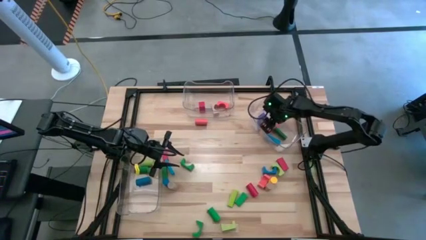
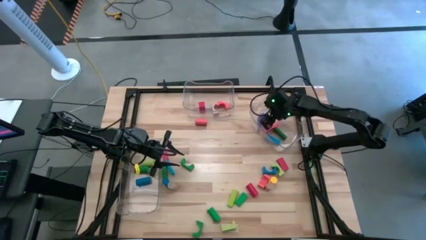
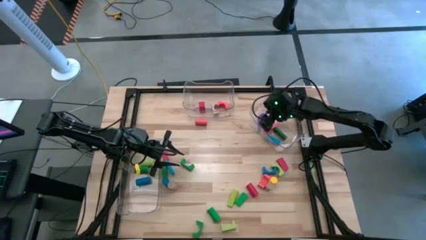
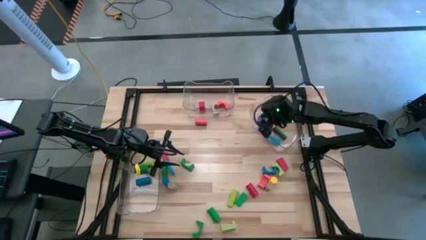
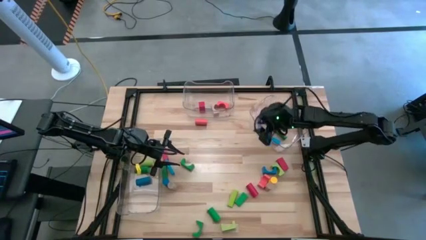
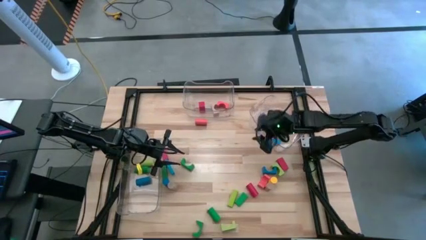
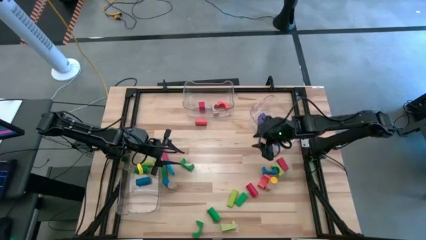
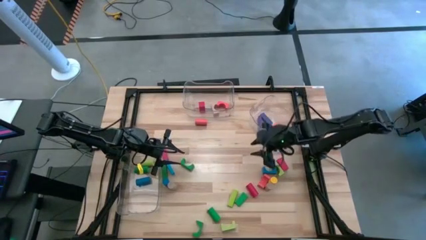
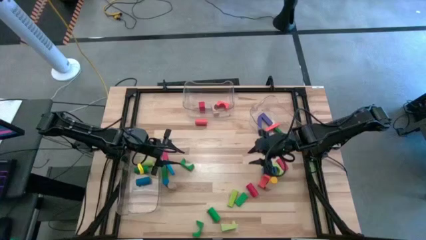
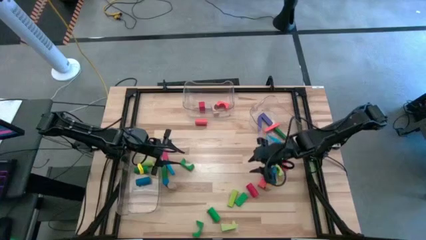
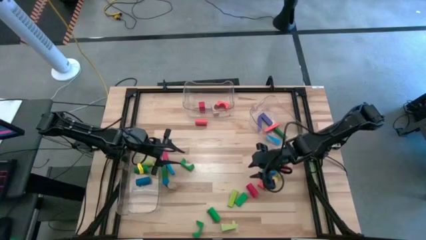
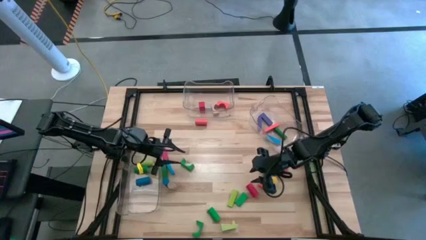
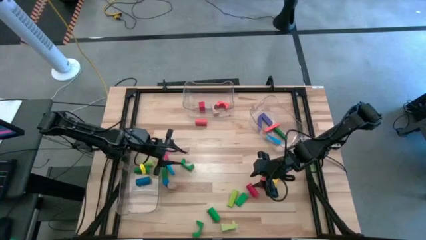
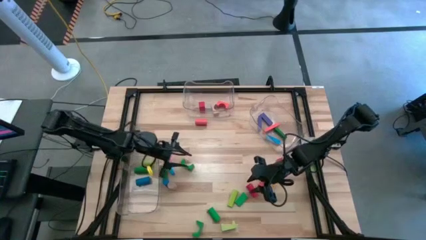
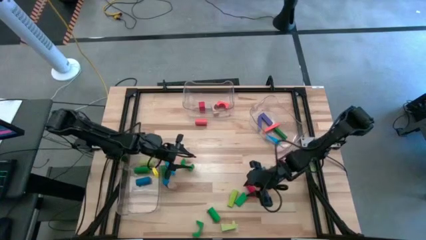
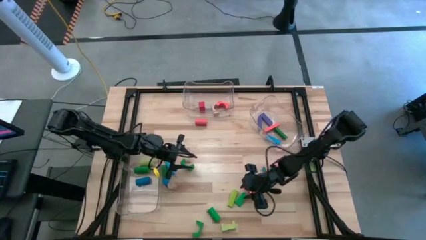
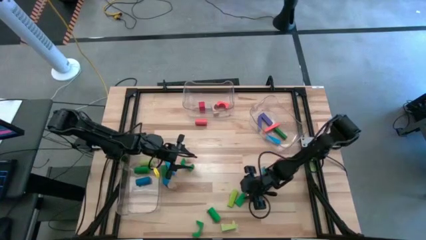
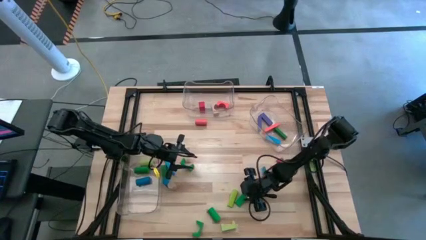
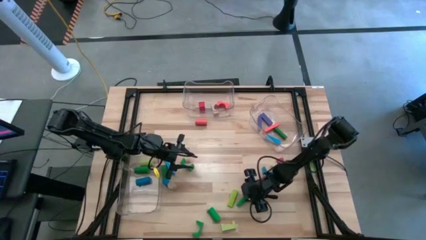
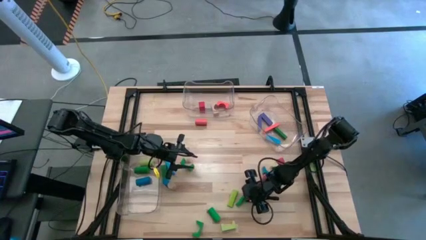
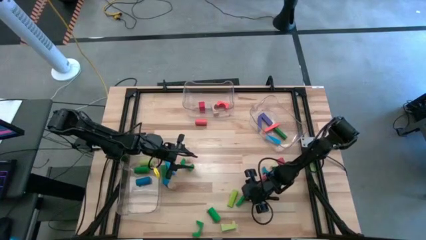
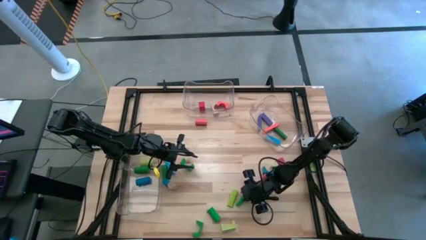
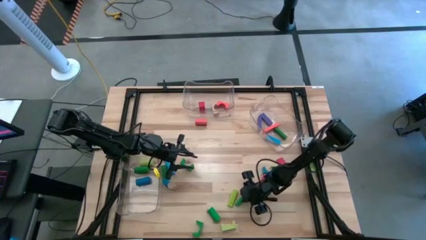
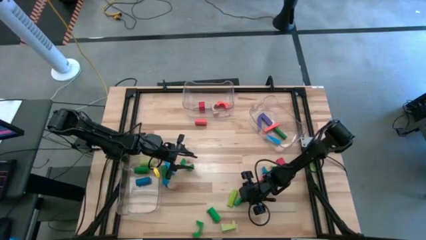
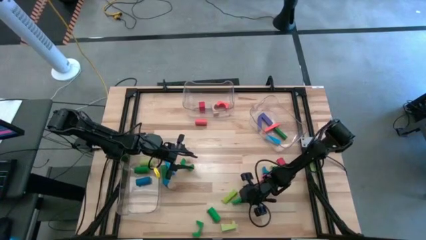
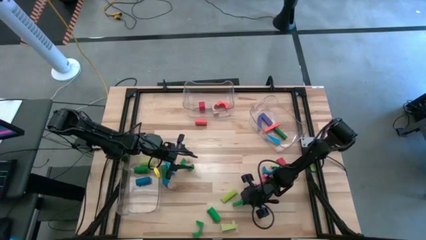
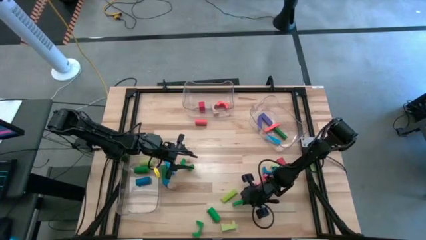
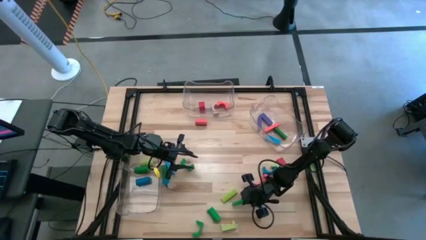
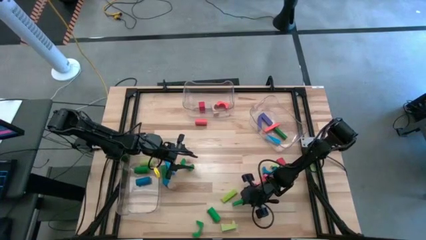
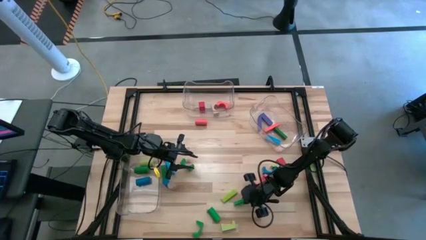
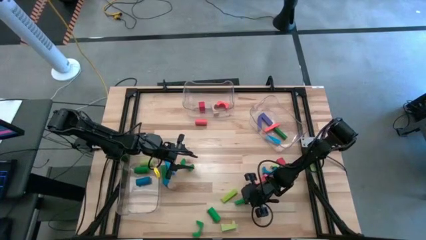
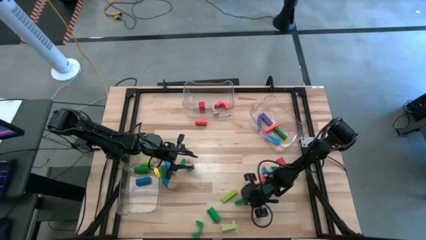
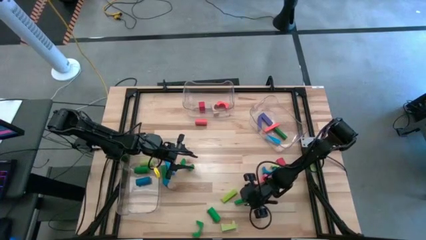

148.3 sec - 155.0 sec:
Task: Sort blocks by size
Put the green rectangular block into the right transparent bin

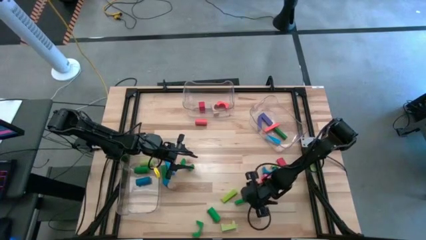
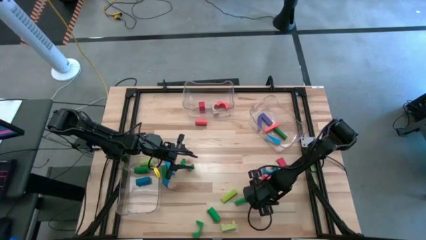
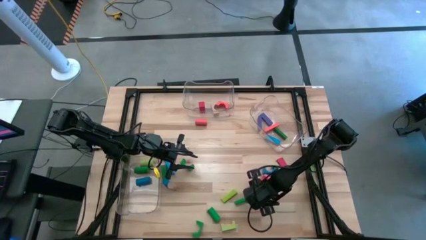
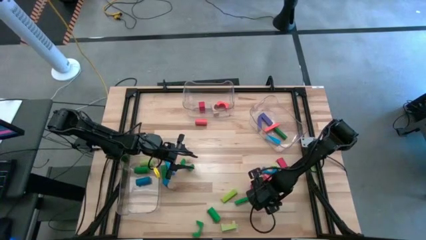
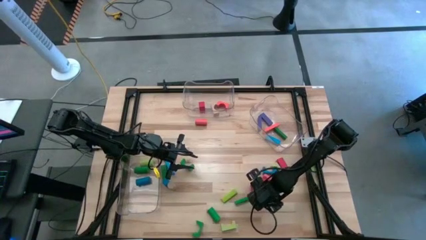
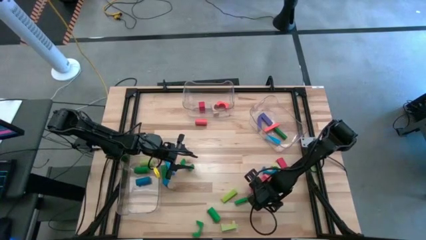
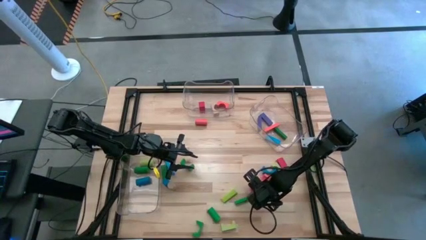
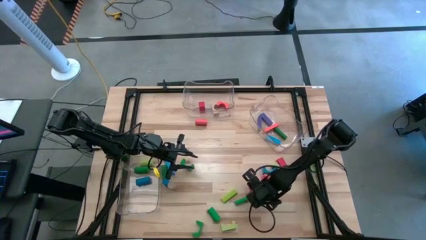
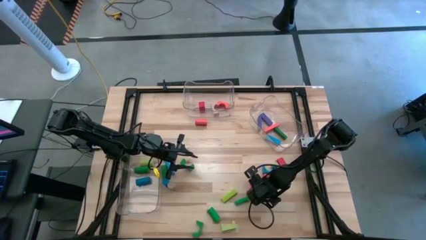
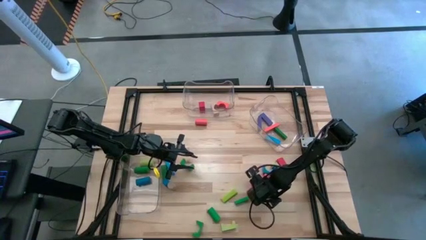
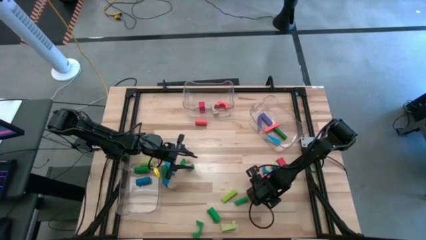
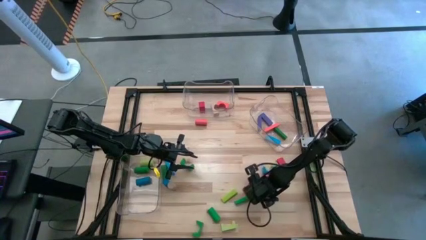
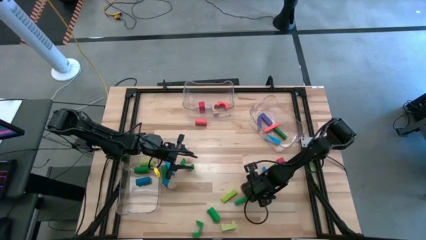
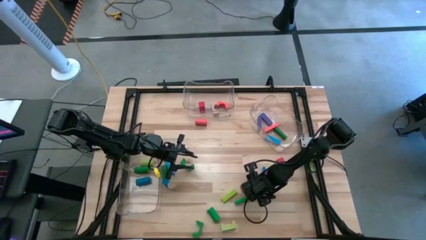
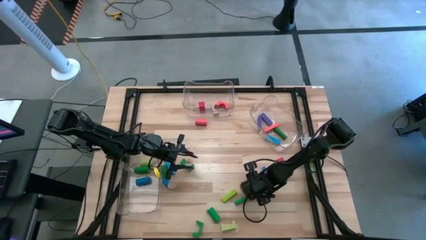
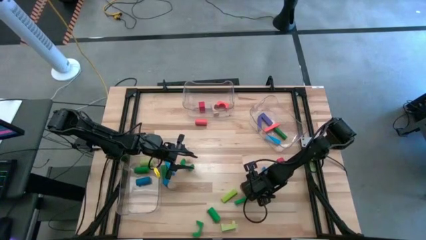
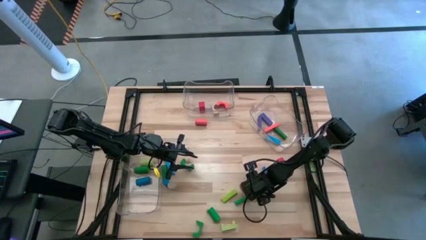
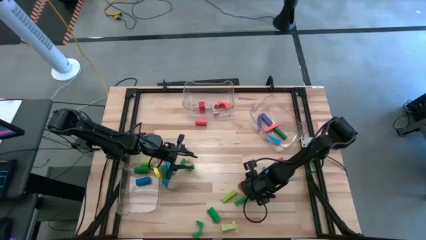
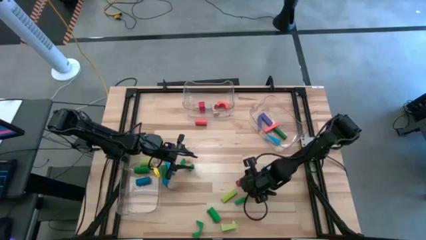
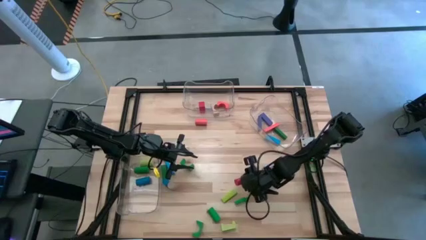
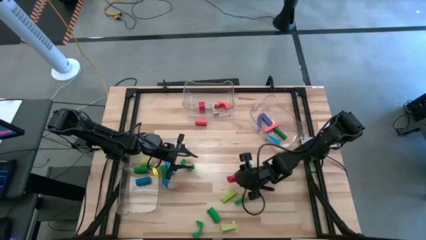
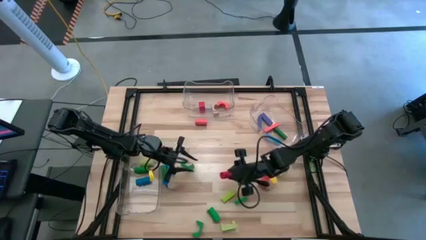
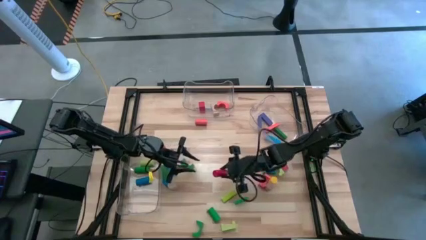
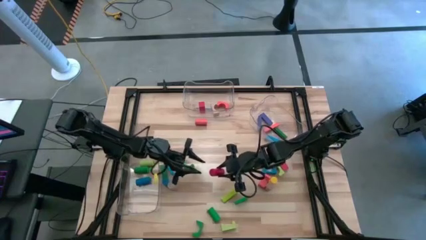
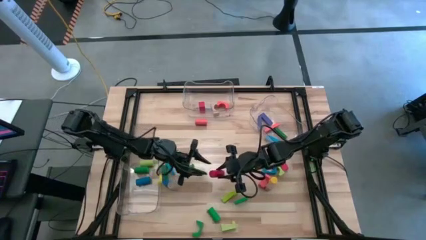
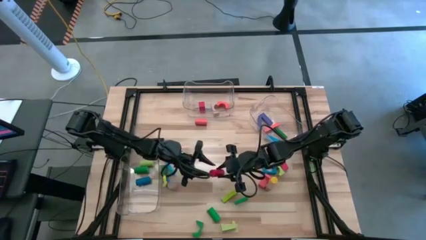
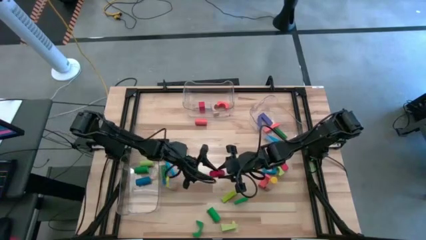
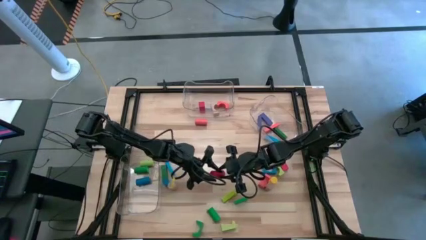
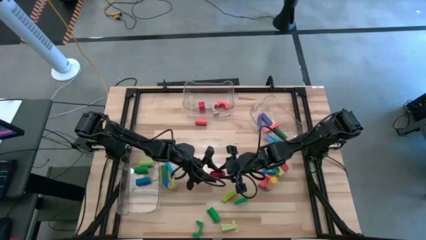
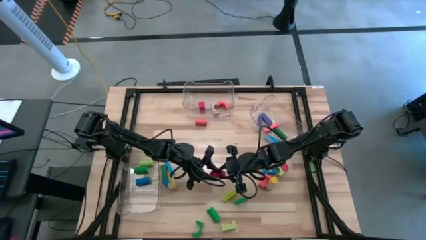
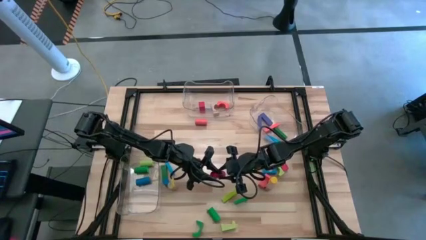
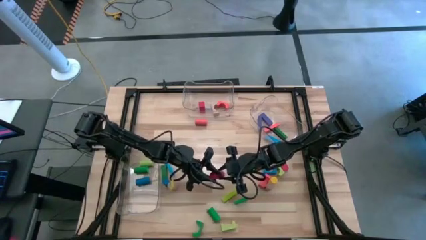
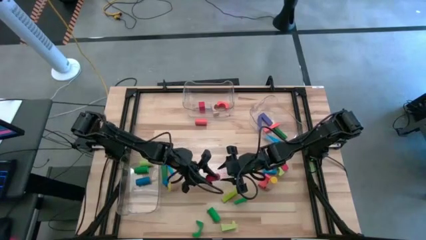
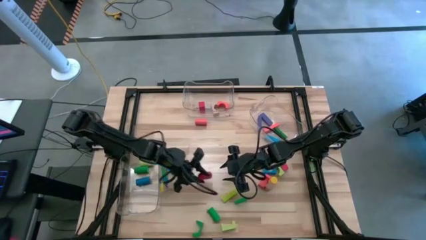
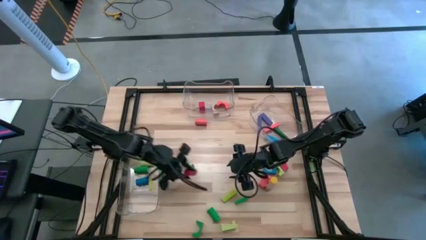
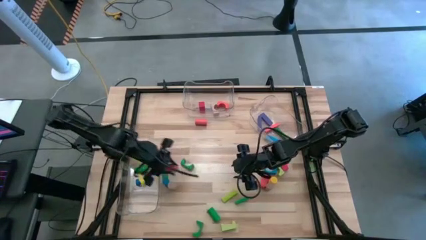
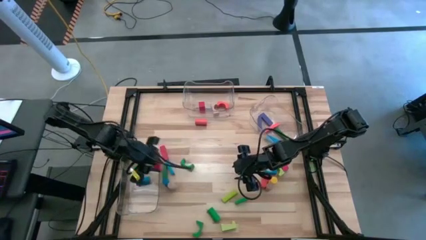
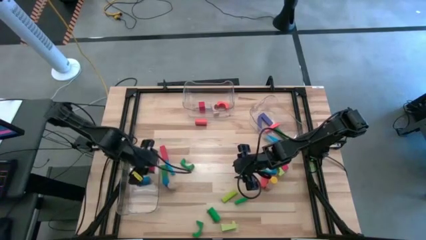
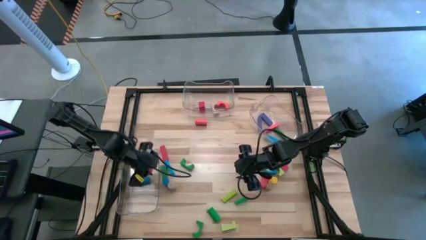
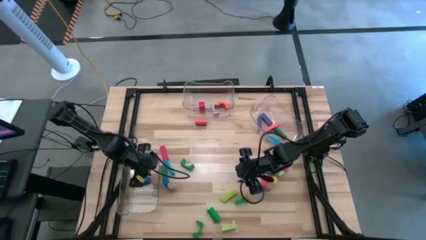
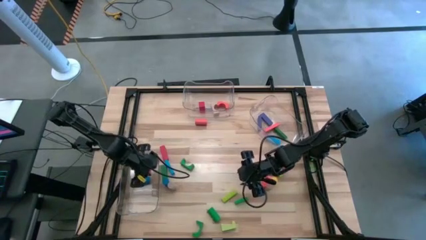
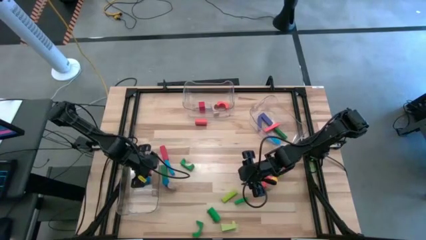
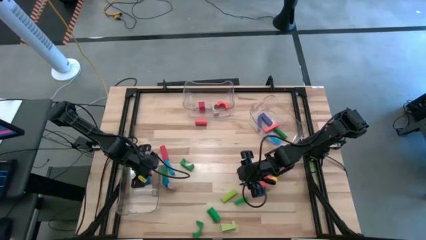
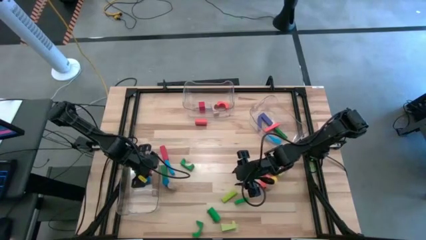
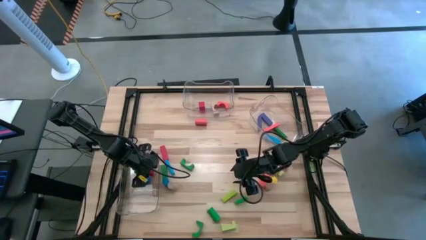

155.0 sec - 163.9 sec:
Put the red cylindrical block into the left transparent bin
